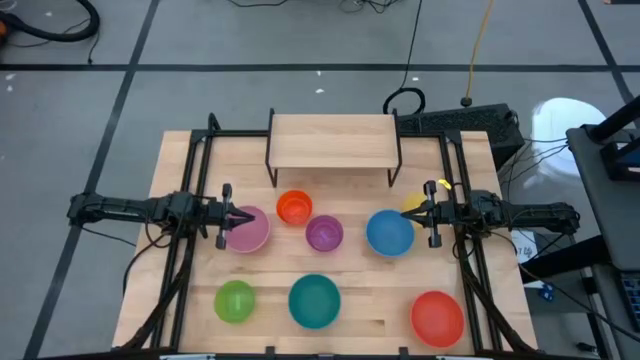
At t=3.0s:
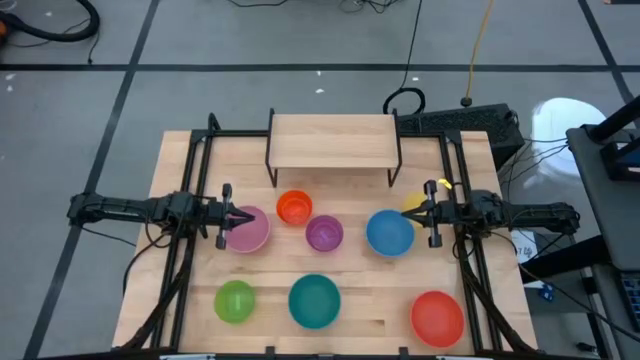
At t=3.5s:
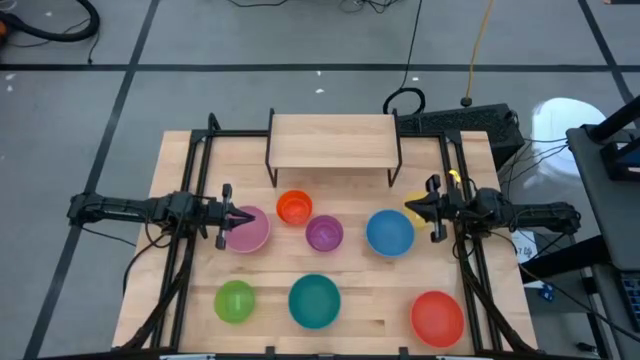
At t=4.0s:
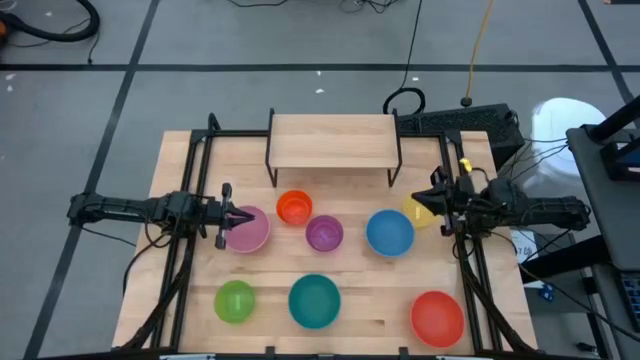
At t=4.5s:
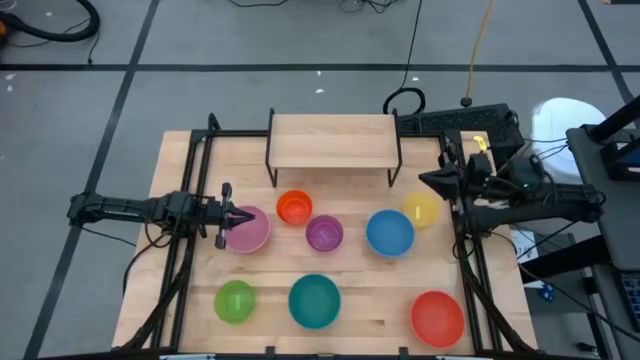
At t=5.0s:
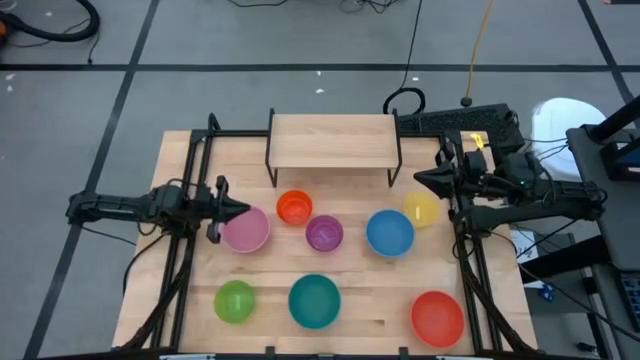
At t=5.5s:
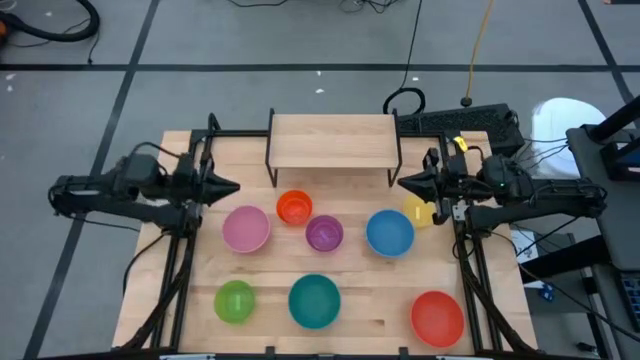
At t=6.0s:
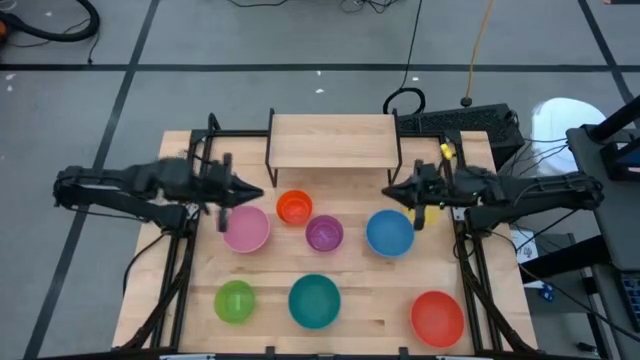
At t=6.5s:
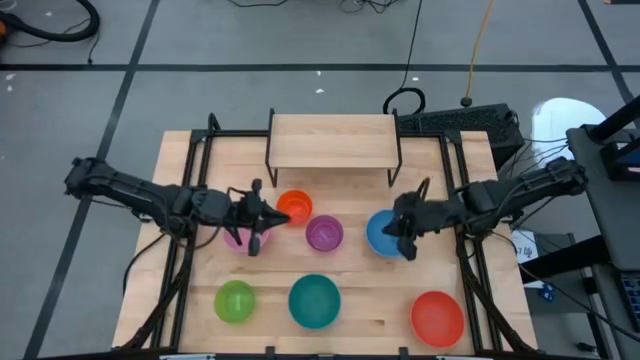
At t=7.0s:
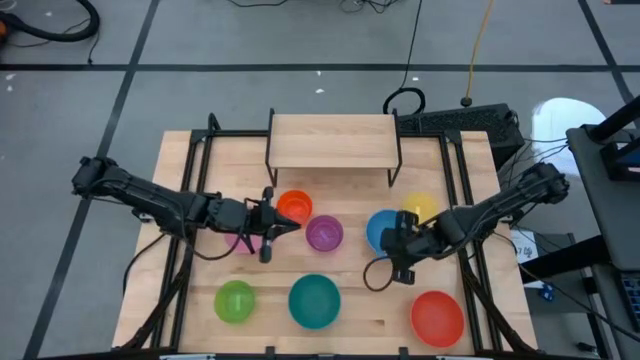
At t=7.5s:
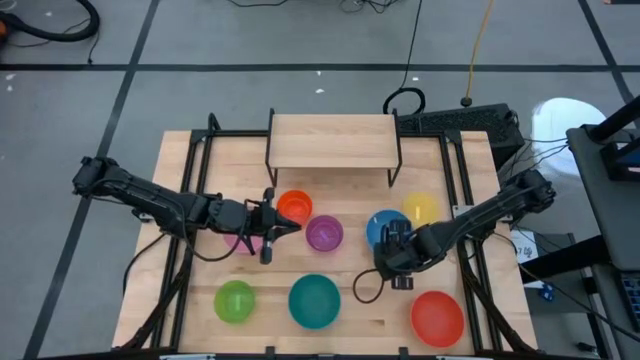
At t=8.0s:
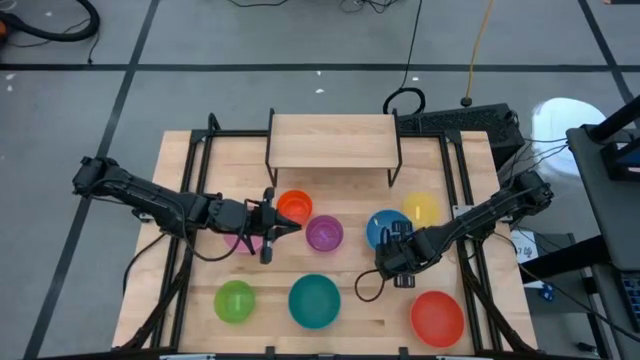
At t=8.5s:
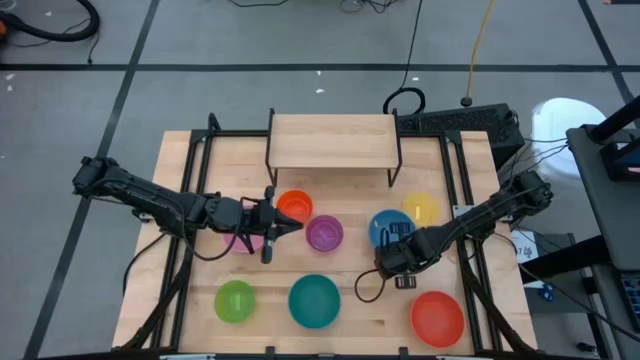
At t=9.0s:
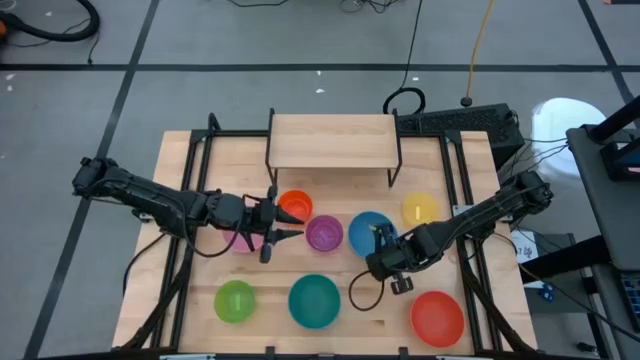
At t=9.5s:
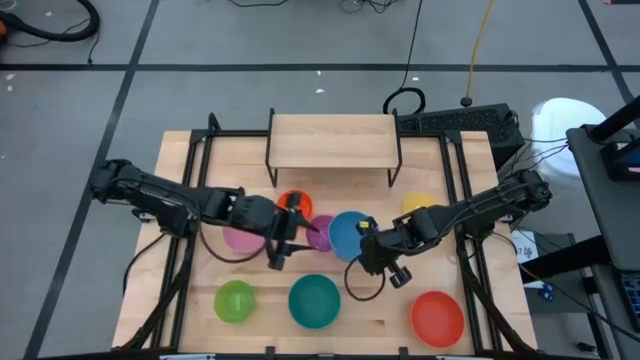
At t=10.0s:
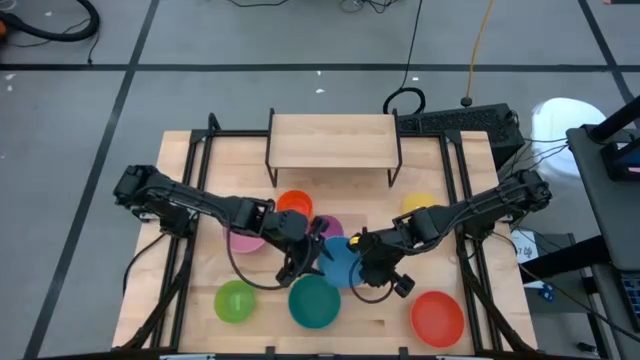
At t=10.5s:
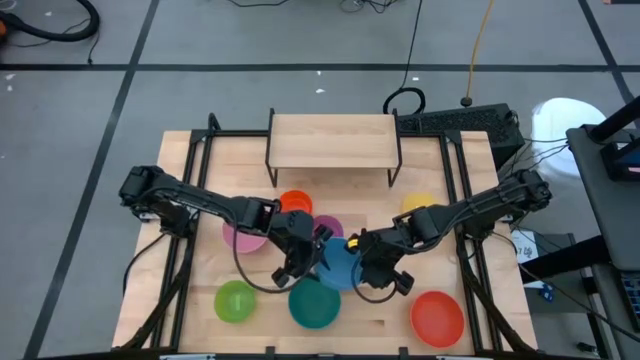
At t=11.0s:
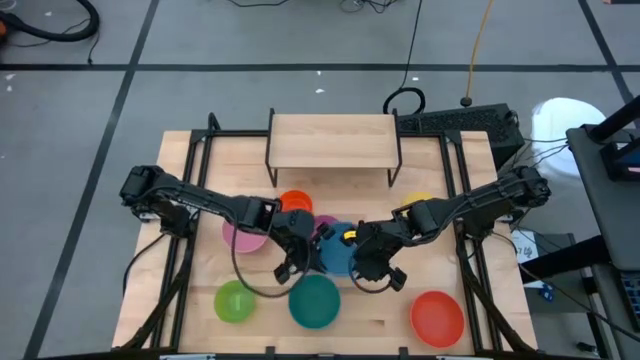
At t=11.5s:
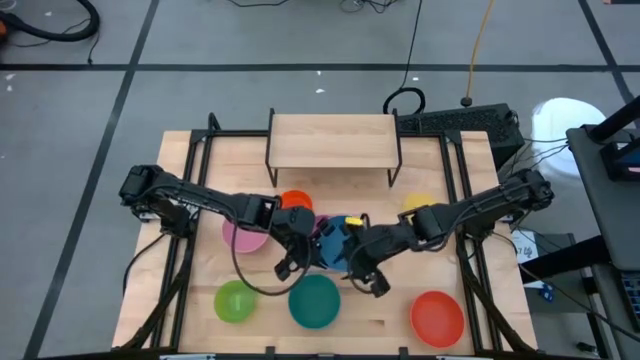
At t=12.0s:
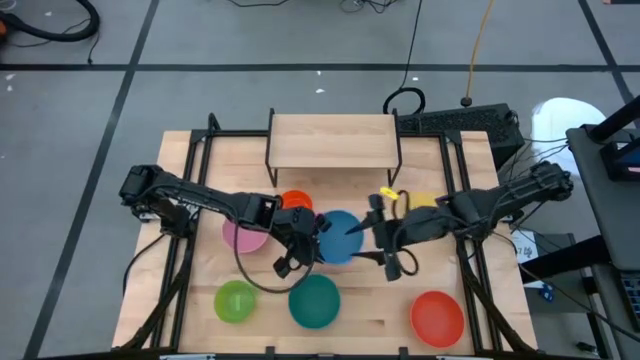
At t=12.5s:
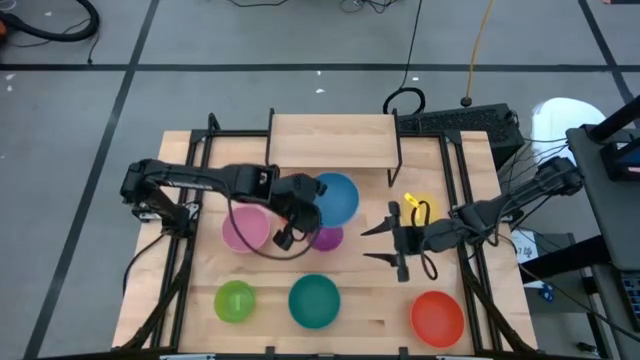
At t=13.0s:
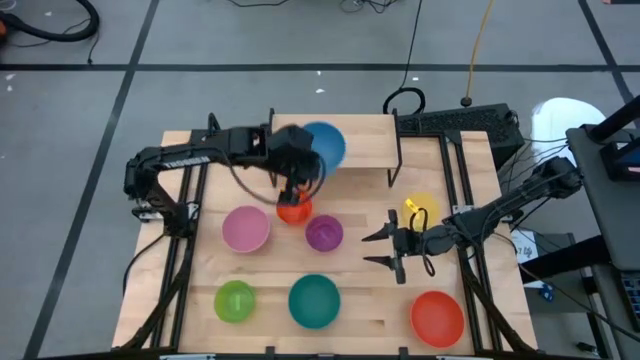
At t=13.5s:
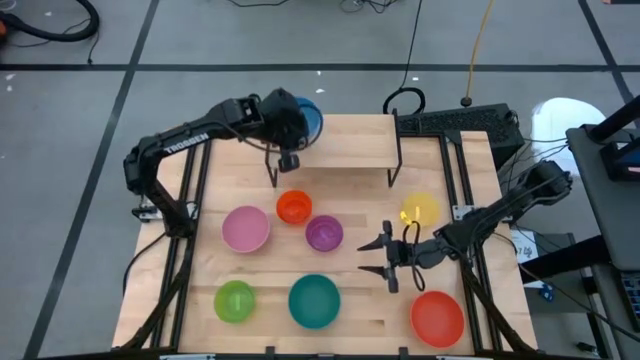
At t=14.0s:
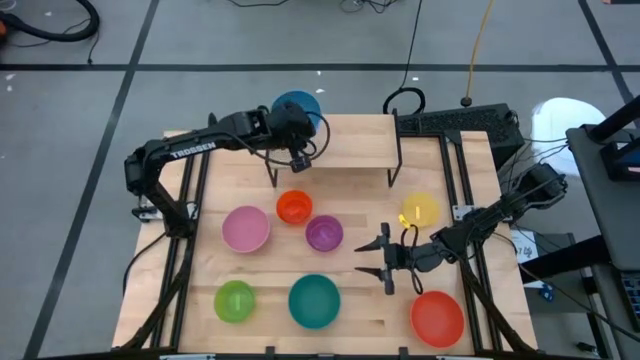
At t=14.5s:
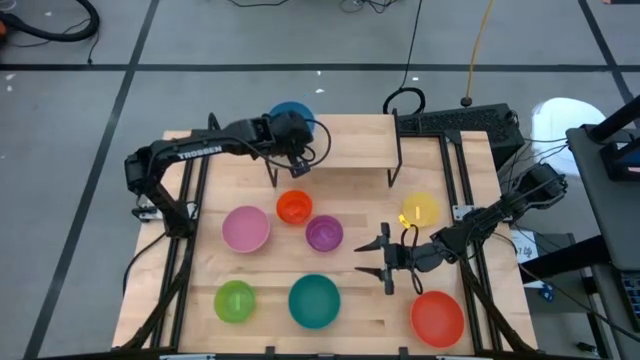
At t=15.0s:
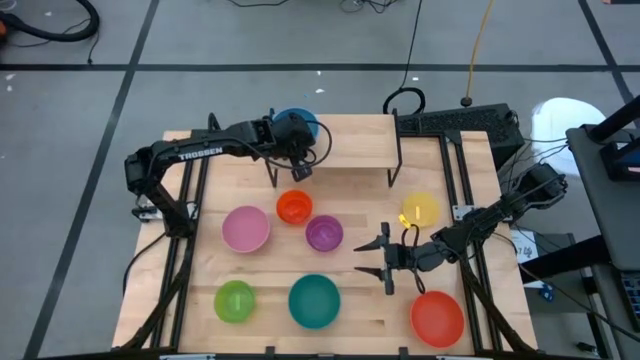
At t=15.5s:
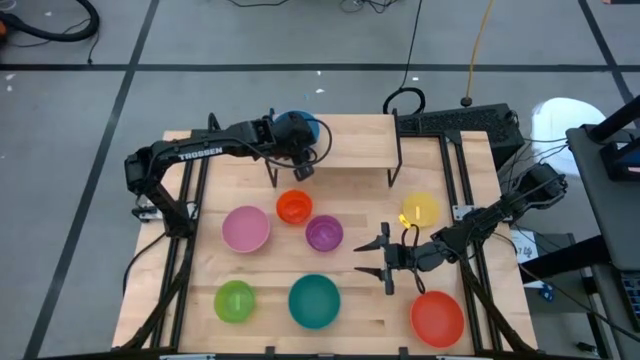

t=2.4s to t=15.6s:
Task: Place and stack bowls onto a shelf
Put the blue bowl on the shelf

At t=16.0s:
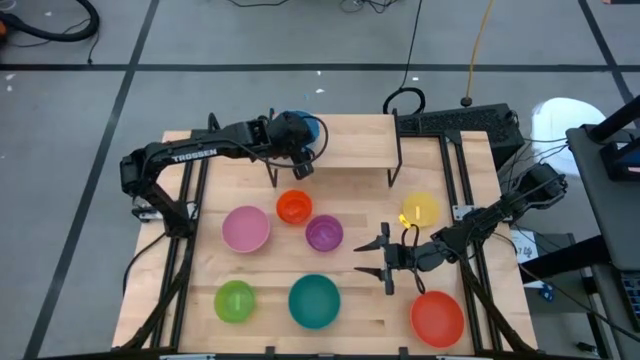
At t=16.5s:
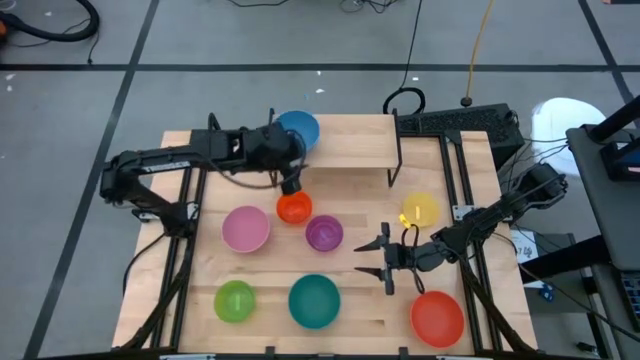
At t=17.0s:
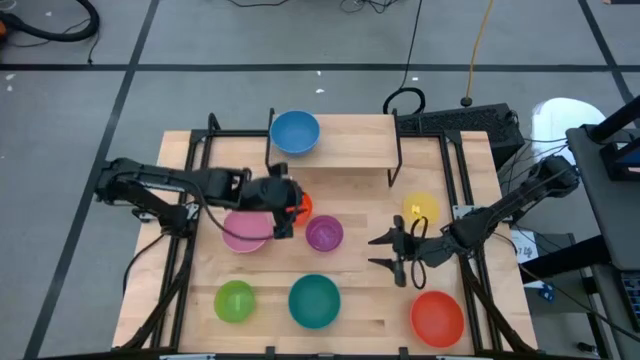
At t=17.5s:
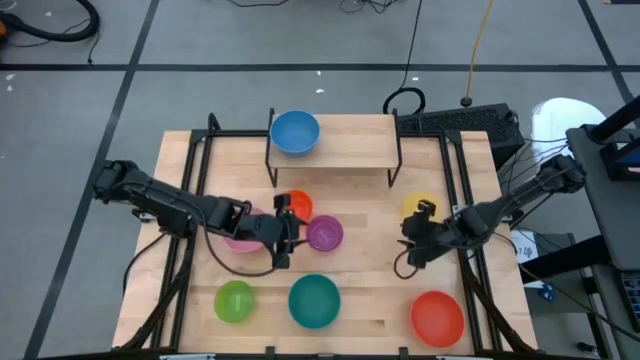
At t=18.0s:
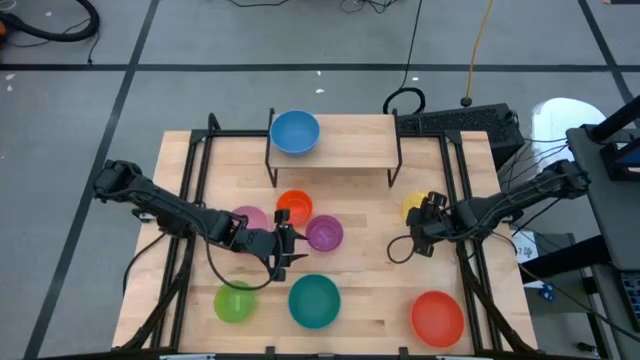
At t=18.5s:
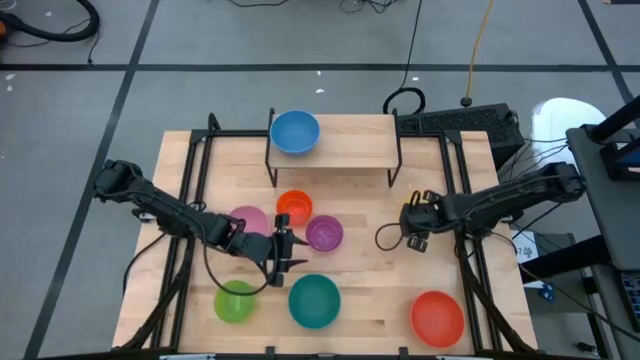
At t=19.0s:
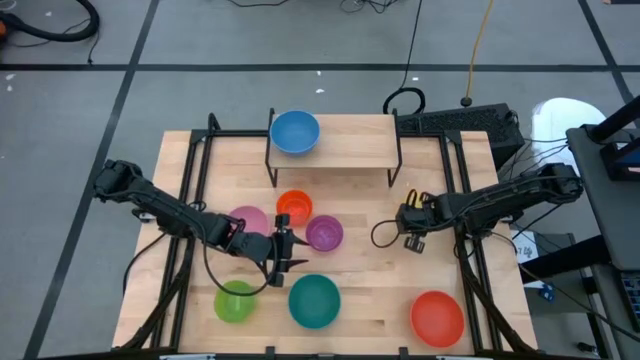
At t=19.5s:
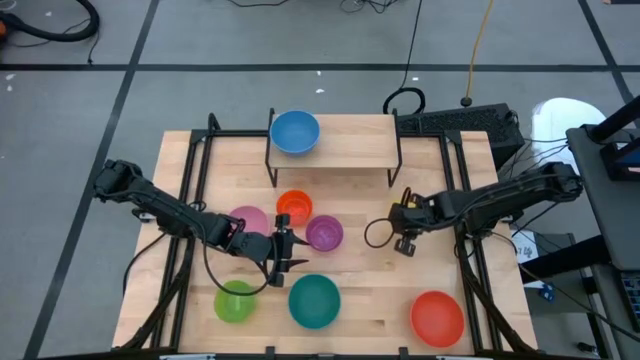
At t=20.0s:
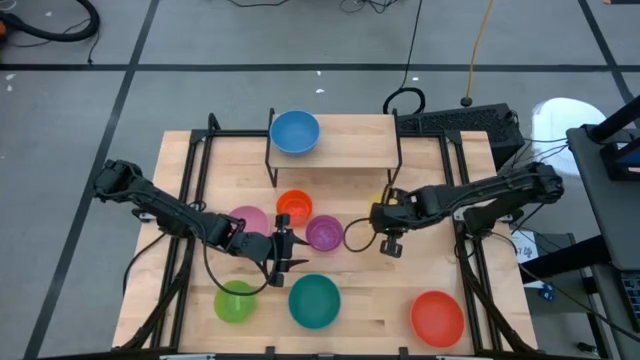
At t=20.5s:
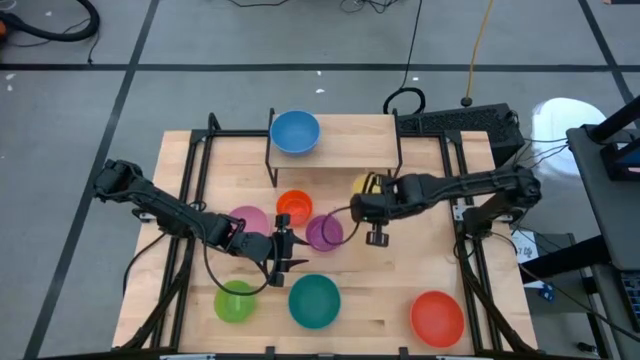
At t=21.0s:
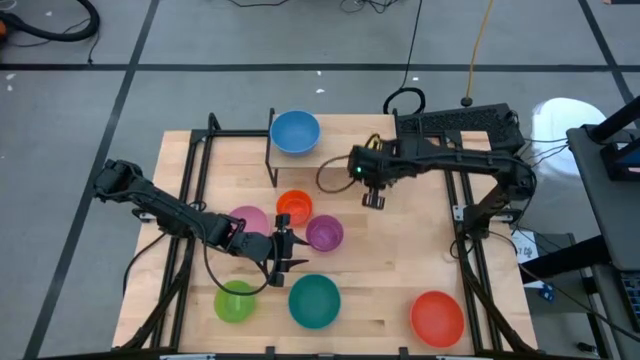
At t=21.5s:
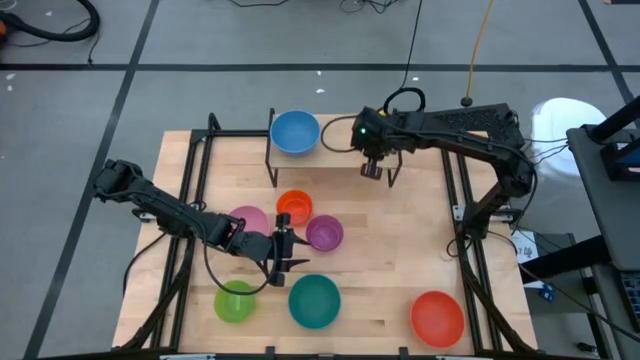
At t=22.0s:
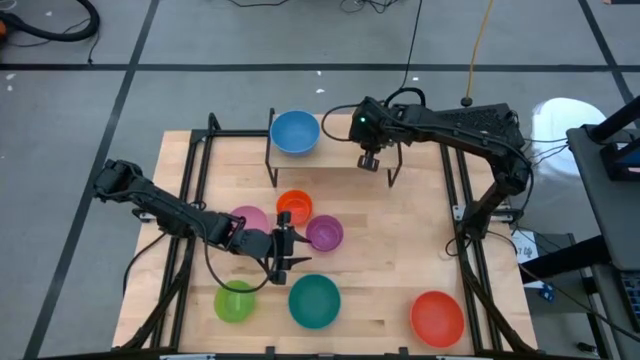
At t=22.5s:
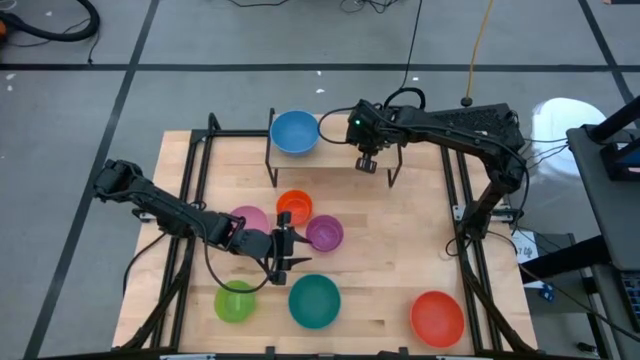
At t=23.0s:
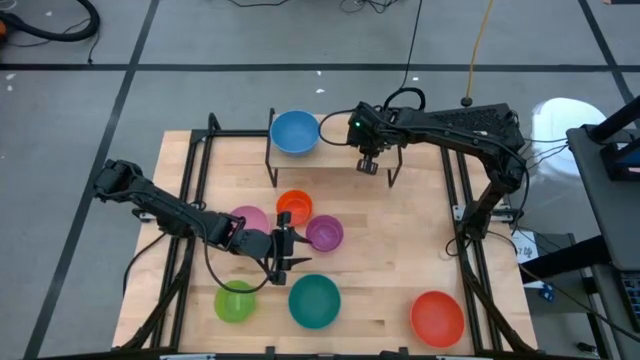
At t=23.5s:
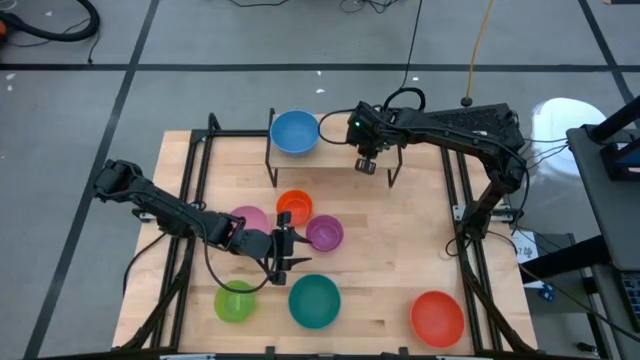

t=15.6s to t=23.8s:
Put the yellow bowl on the shelf
